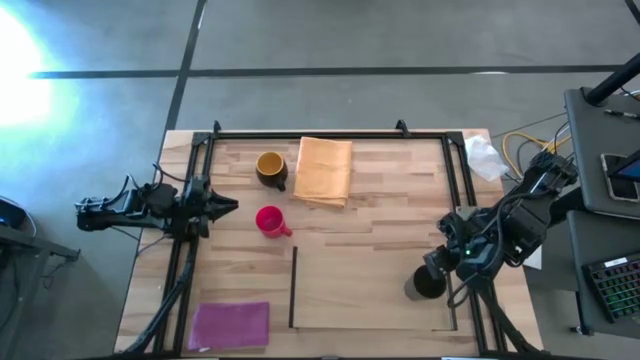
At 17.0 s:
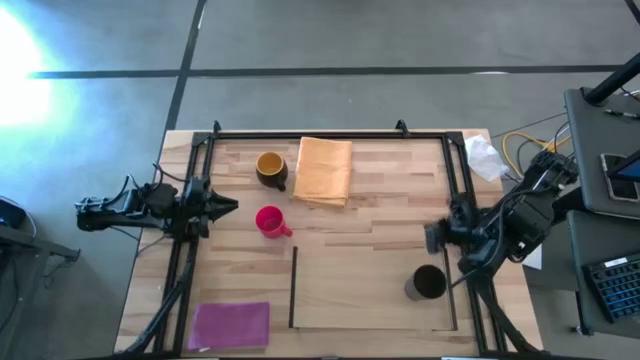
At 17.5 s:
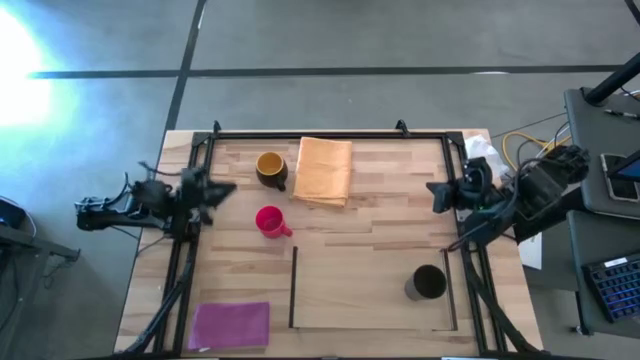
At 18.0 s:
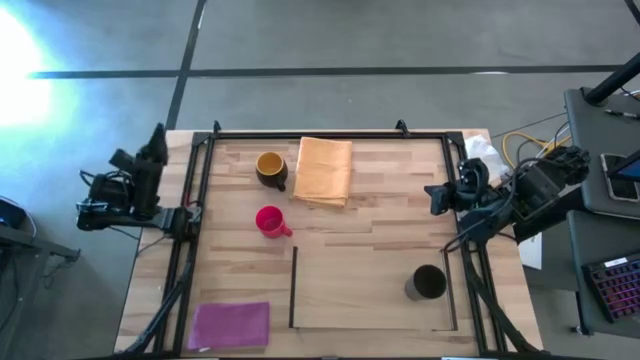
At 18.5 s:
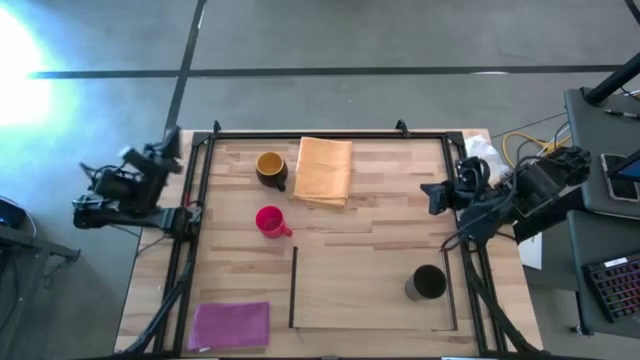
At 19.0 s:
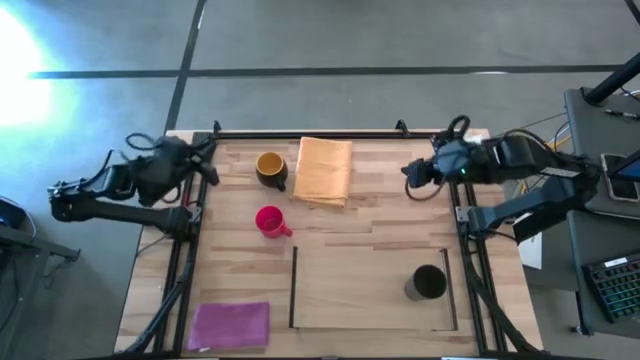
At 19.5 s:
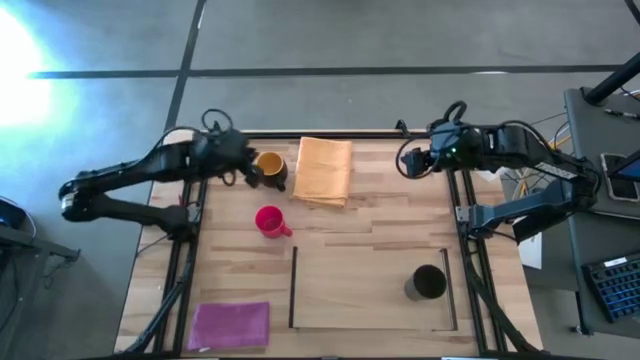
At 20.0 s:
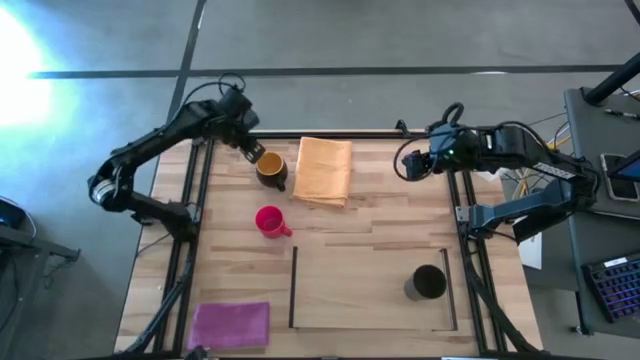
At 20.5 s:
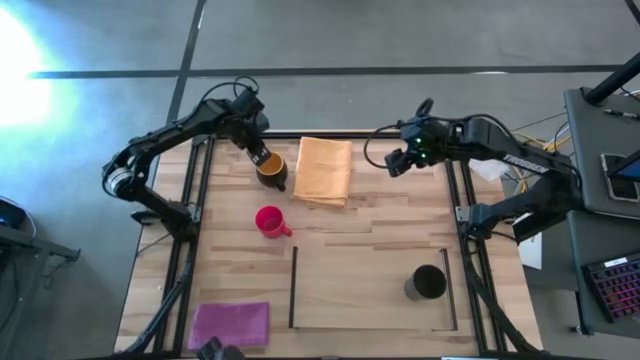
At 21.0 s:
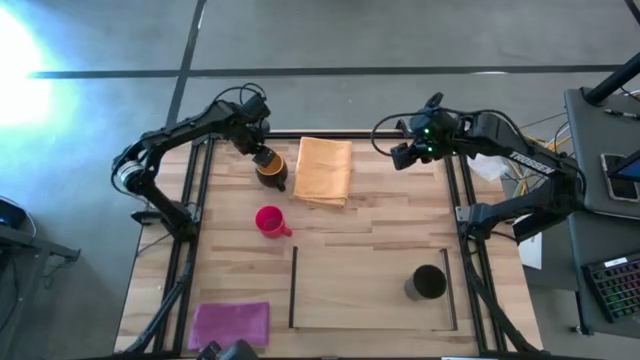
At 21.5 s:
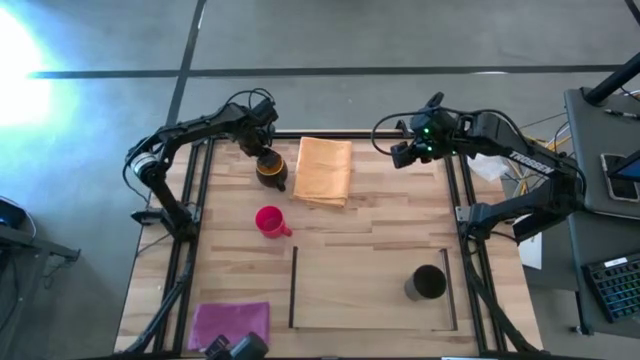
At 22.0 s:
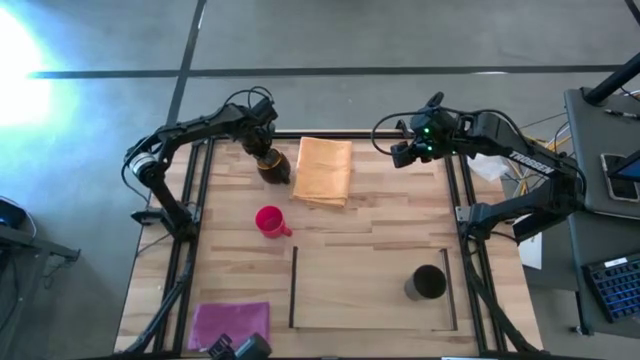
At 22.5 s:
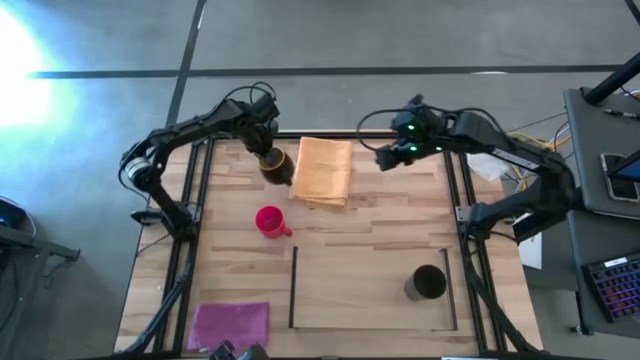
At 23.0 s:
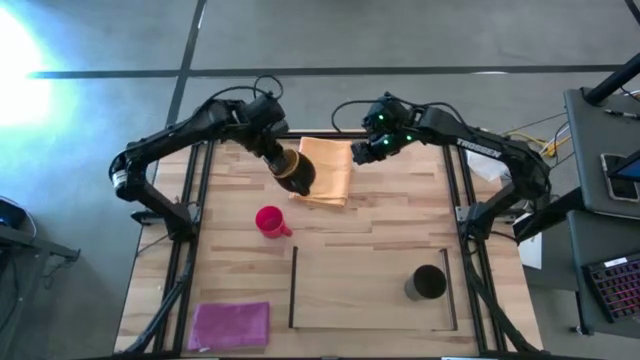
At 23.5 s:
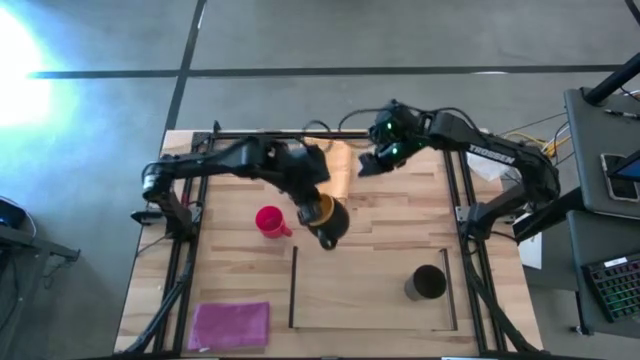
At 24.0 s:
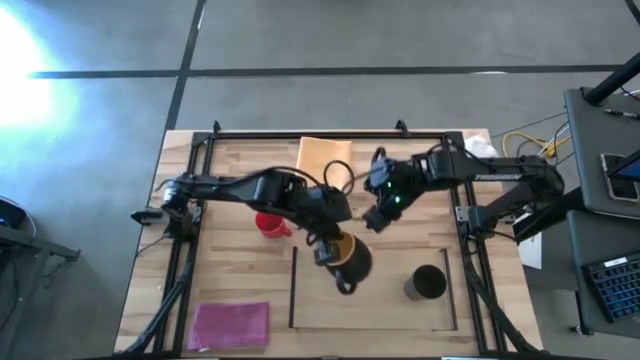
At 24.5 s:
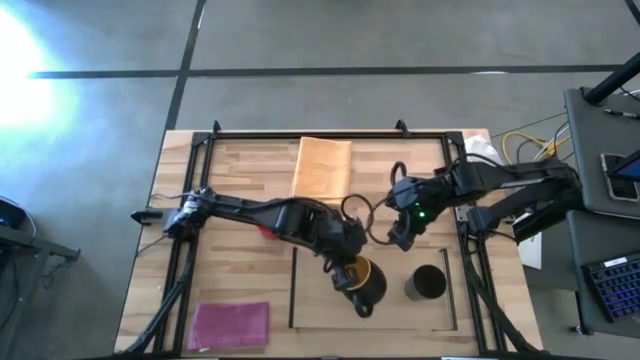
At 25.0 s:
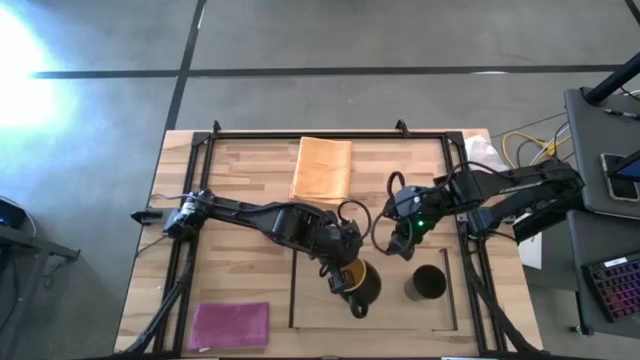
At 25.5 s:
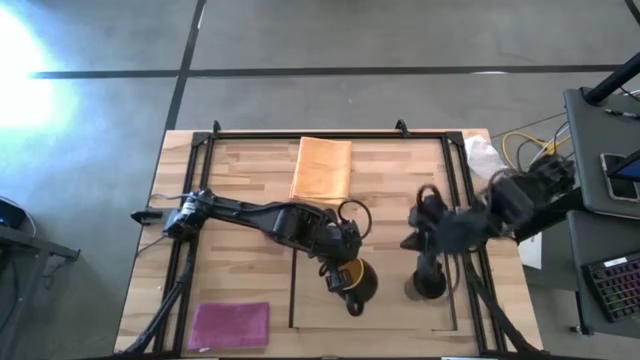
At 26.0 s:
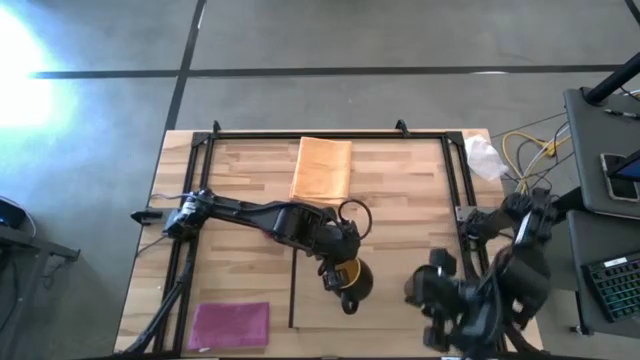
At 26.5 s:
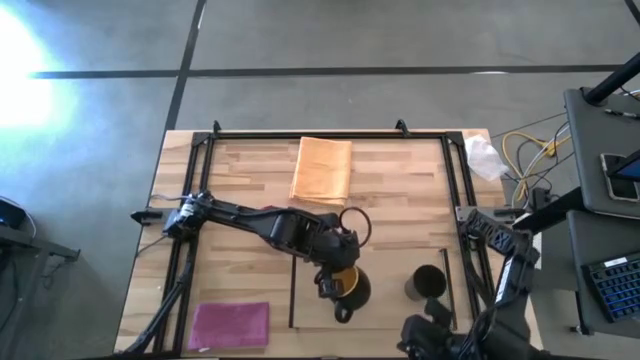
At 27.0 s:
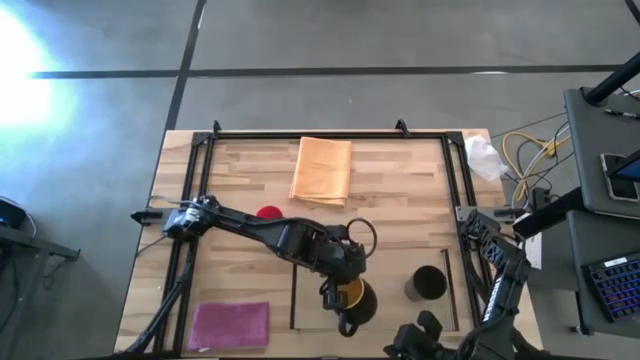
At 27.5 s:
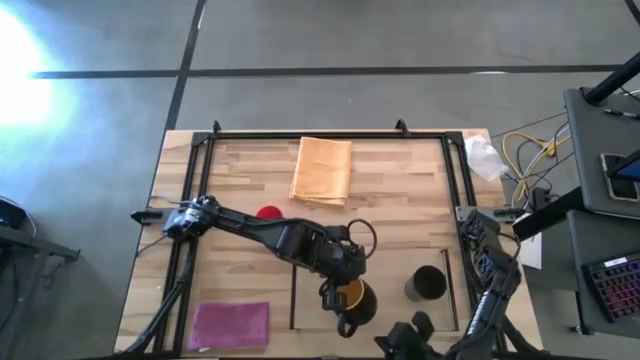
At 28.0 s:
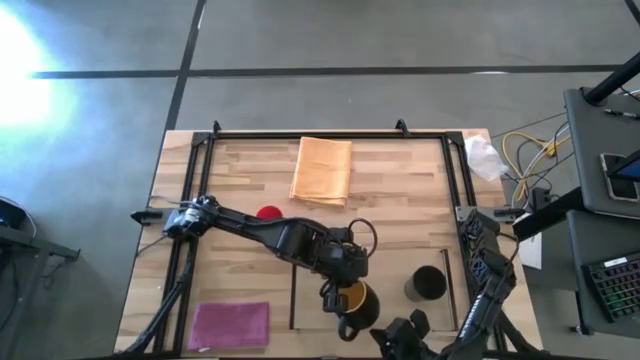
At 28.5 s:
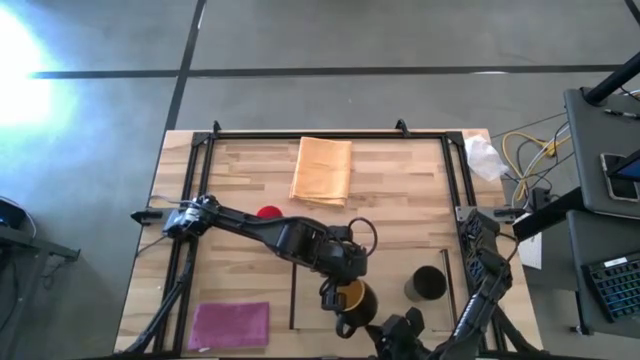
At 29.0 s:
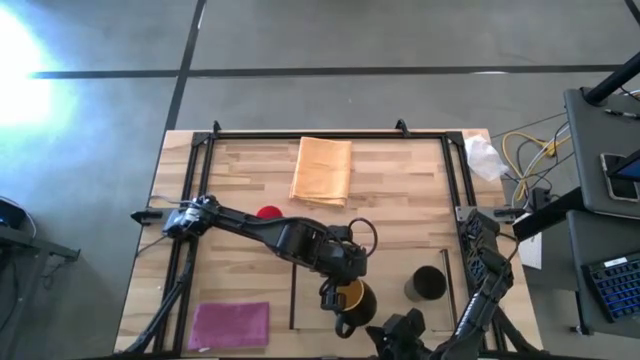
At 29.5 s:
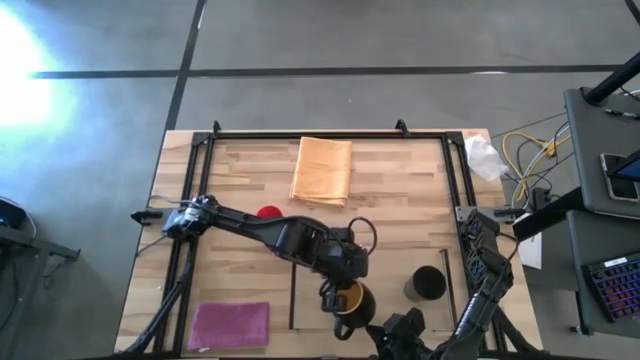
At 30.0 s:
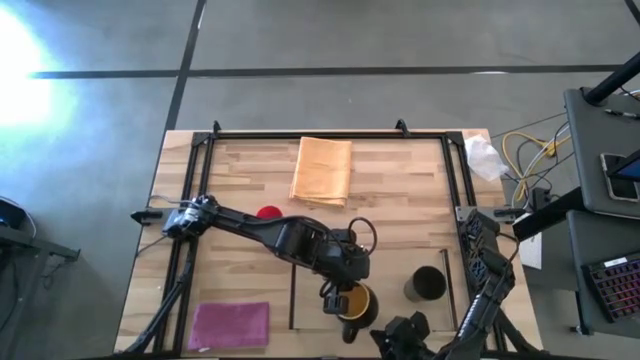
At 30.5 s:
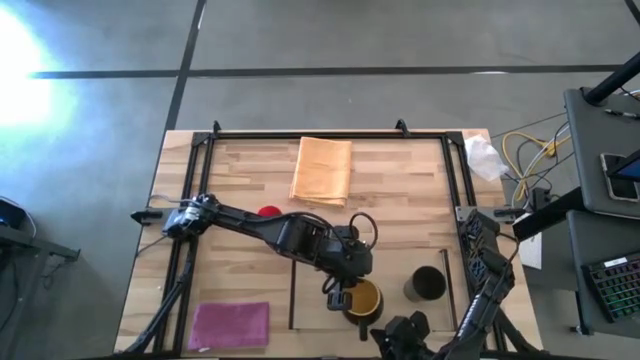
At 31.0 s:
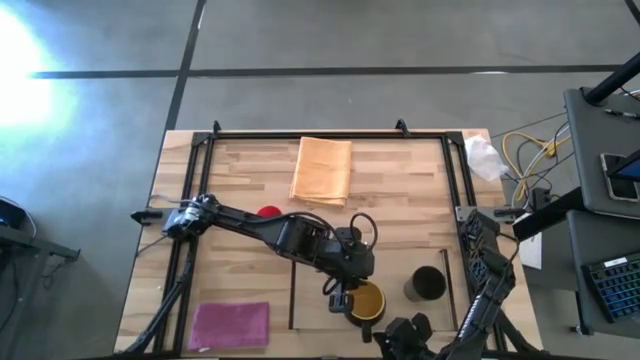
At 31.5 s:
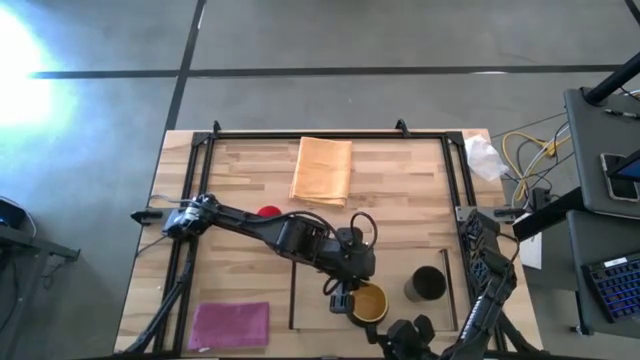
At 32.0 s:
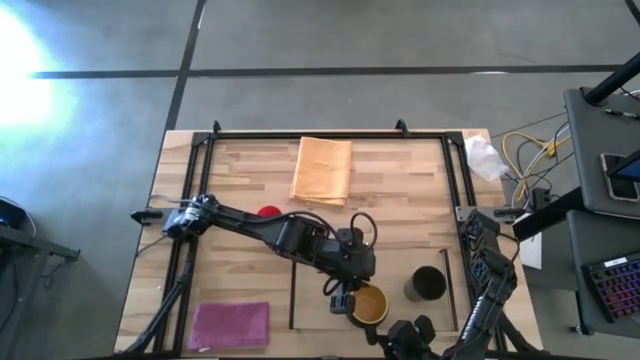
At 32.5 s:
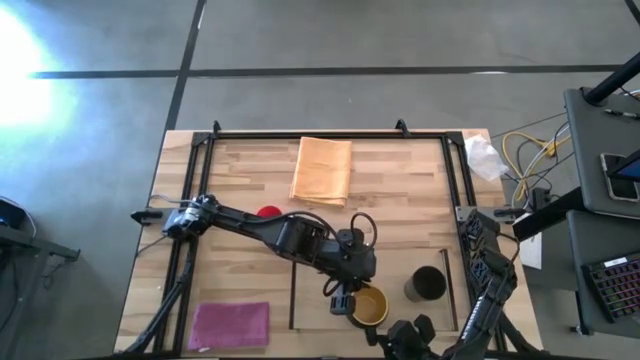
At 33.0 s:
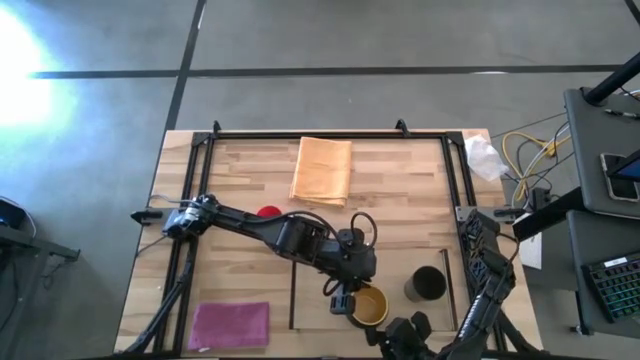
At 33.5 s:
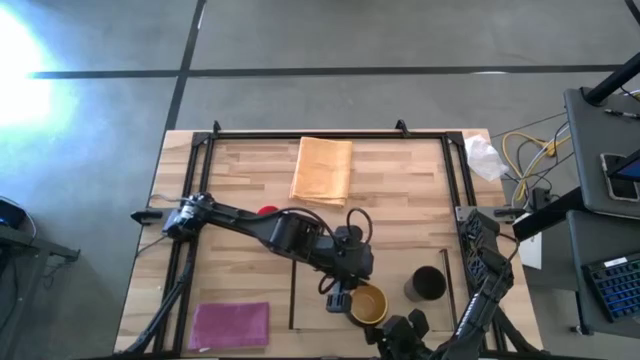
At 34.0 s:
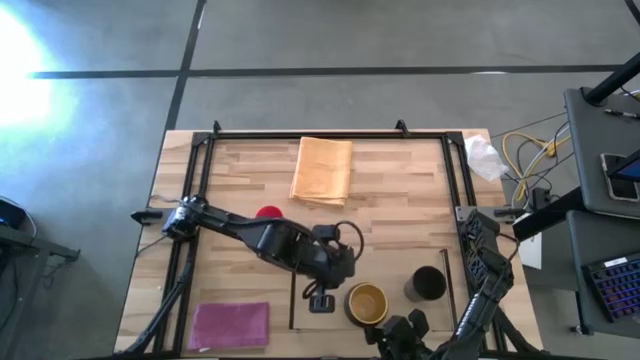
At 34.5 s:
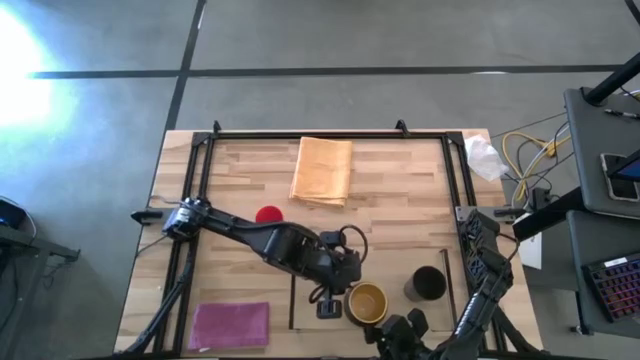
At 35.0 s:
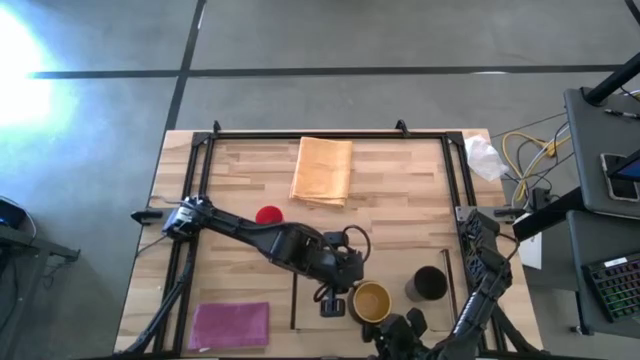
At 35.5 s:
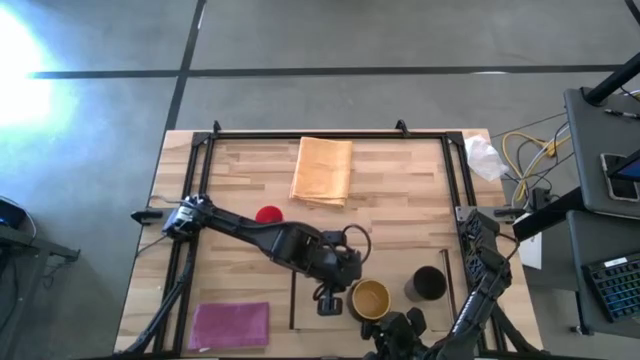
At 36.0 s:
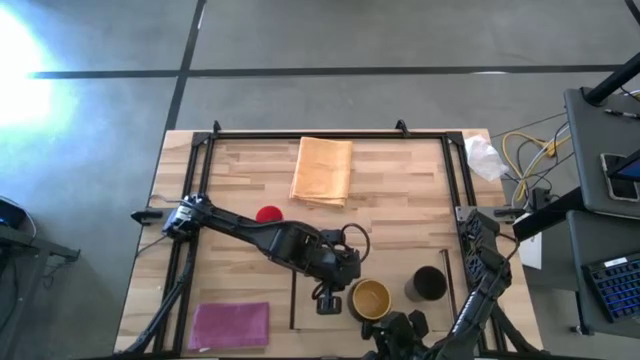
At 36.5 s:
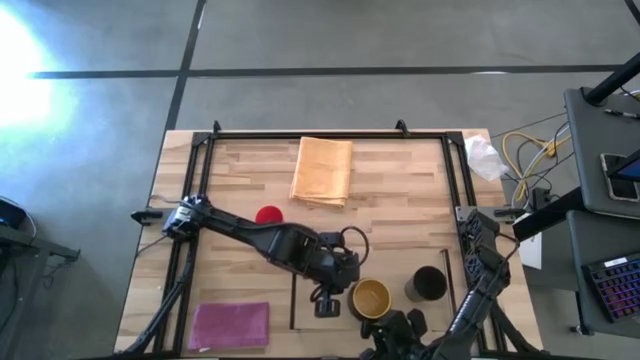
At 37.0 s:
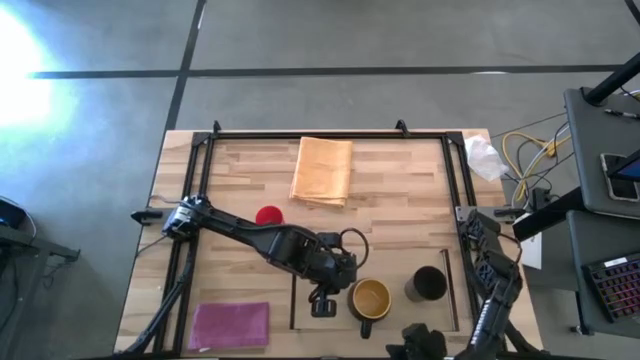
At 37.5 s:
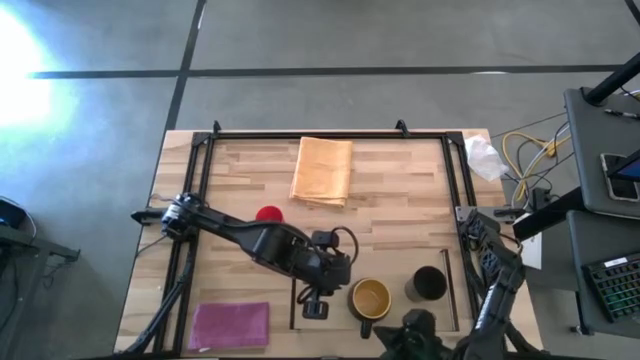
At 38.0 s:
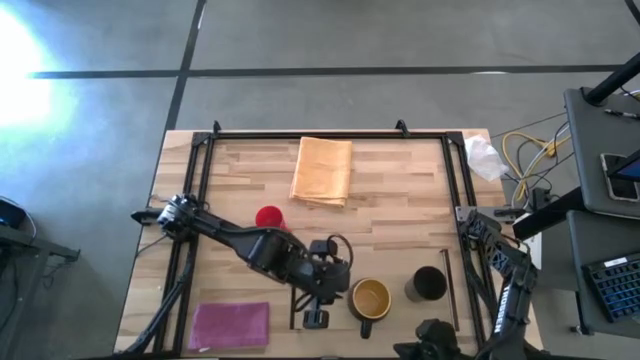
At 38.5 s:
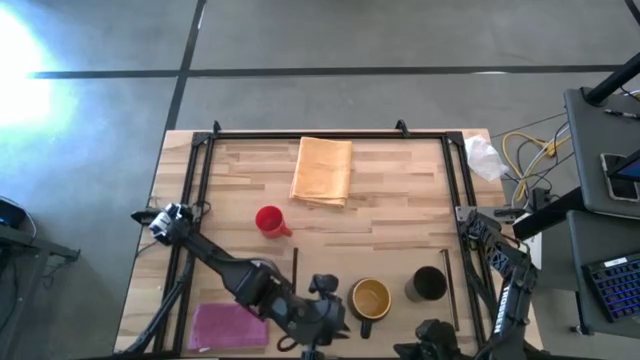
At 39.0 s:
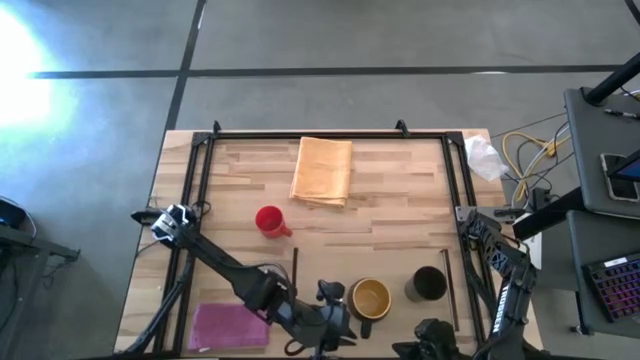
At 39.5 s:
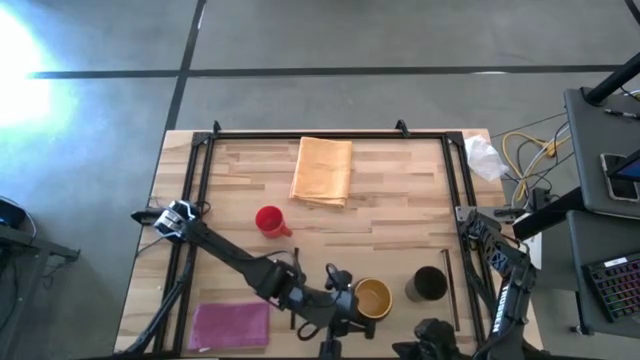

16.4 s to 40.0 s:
Task: Stack small to large cups/mugs on shelf
Put the black mug on the shelf
